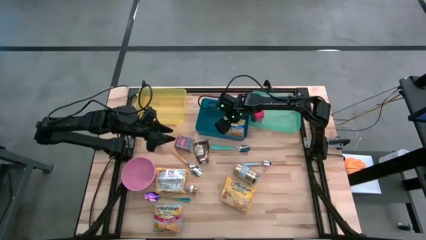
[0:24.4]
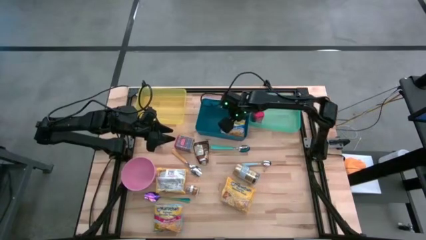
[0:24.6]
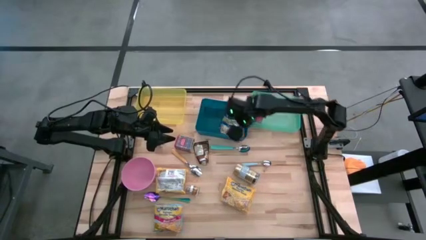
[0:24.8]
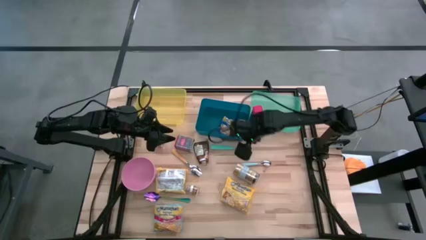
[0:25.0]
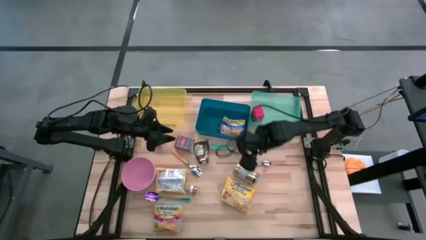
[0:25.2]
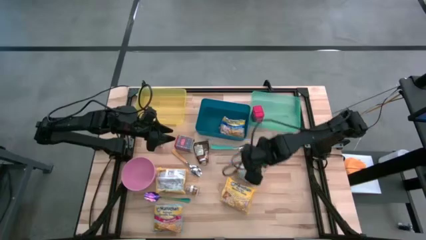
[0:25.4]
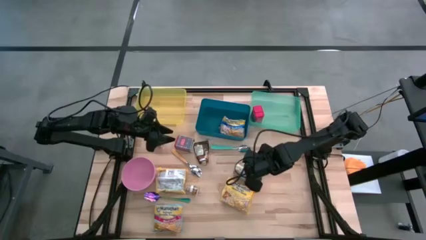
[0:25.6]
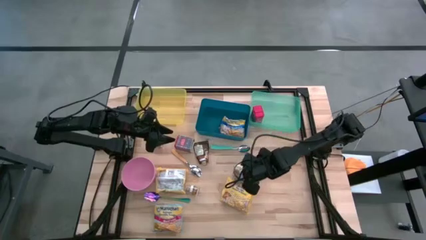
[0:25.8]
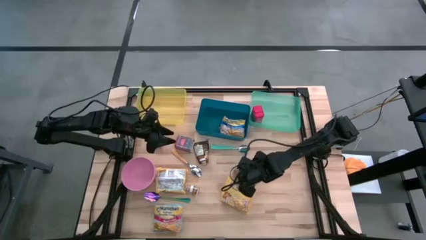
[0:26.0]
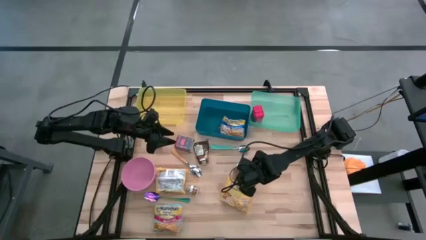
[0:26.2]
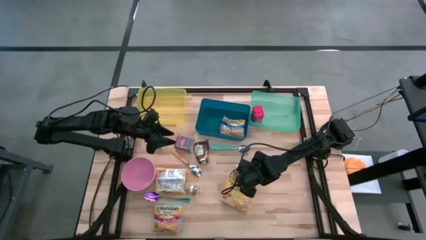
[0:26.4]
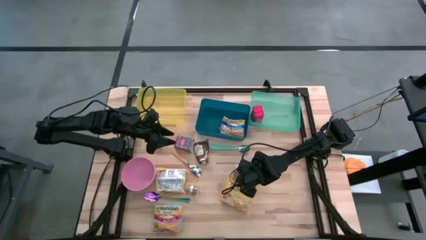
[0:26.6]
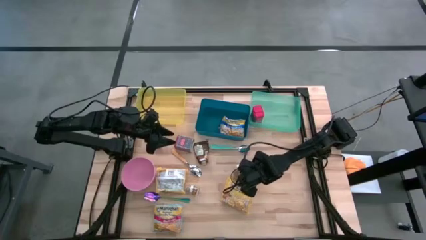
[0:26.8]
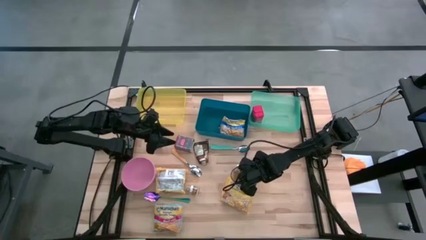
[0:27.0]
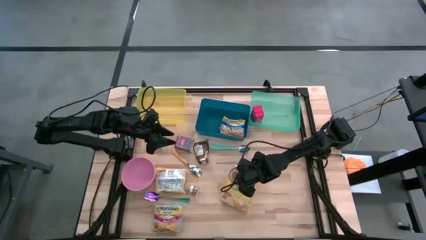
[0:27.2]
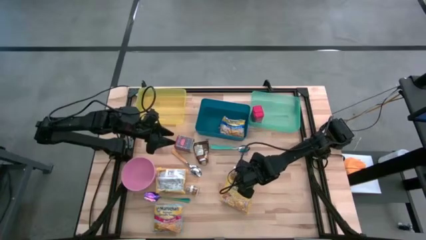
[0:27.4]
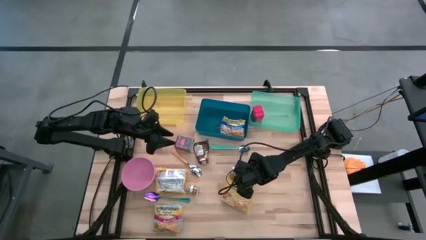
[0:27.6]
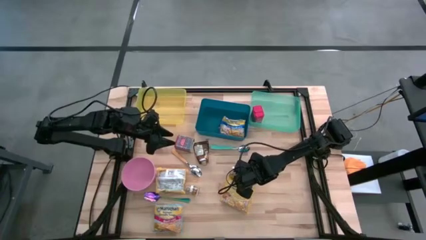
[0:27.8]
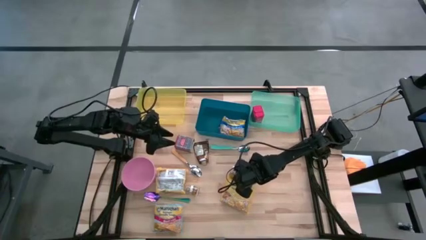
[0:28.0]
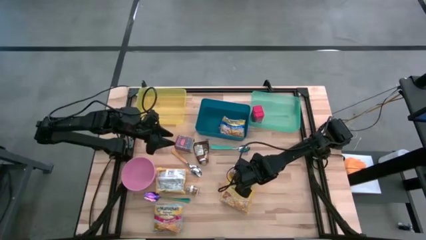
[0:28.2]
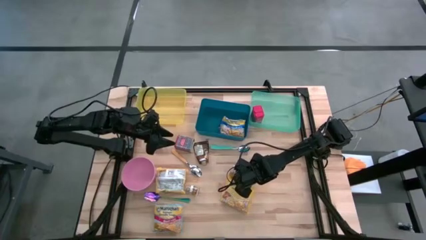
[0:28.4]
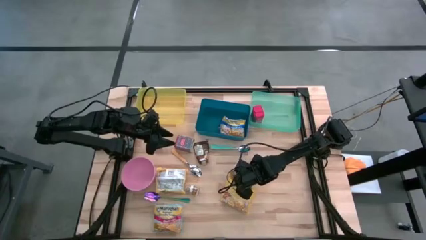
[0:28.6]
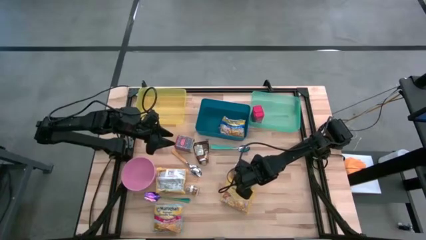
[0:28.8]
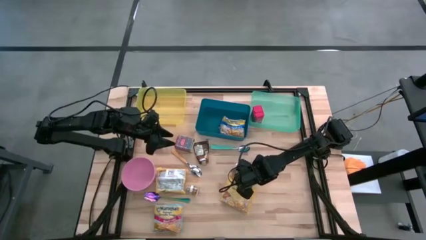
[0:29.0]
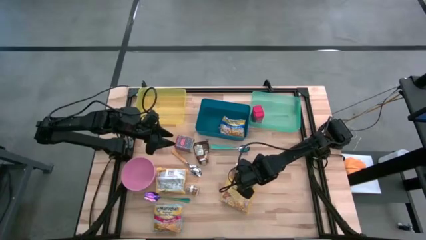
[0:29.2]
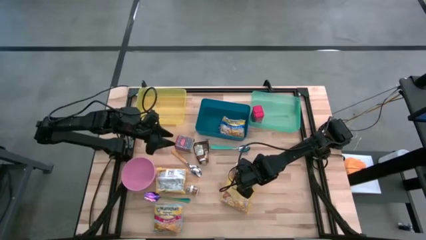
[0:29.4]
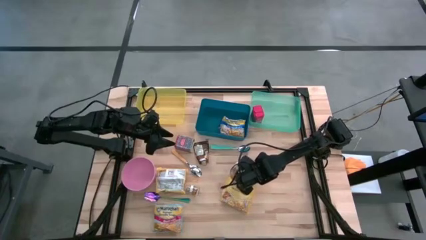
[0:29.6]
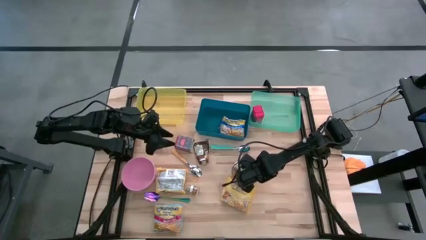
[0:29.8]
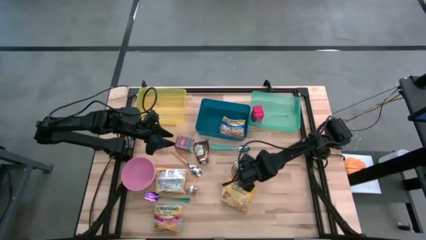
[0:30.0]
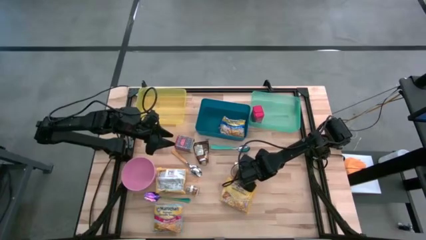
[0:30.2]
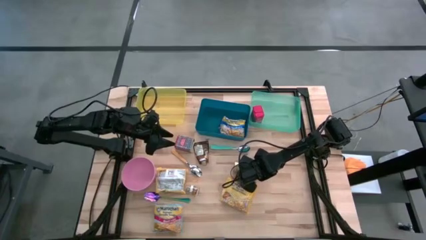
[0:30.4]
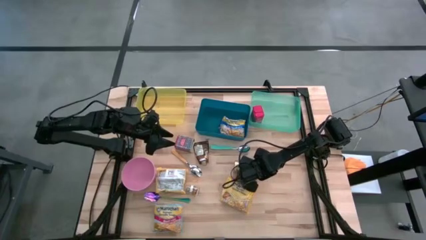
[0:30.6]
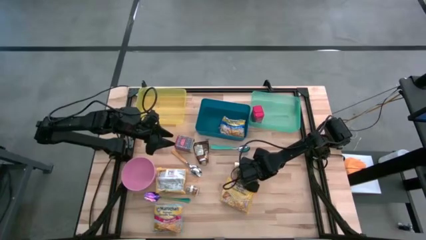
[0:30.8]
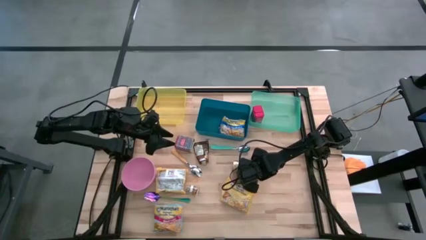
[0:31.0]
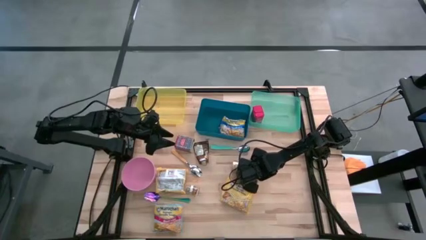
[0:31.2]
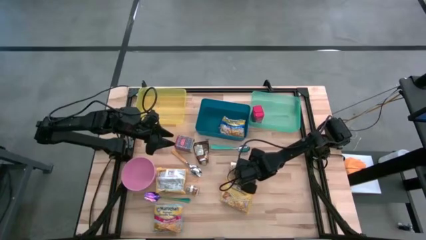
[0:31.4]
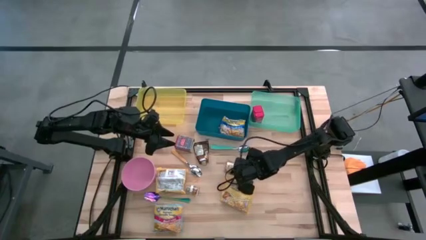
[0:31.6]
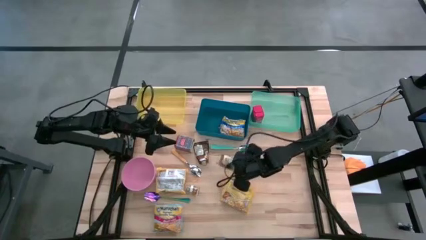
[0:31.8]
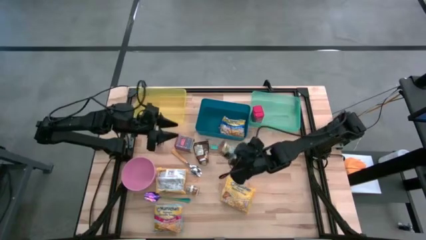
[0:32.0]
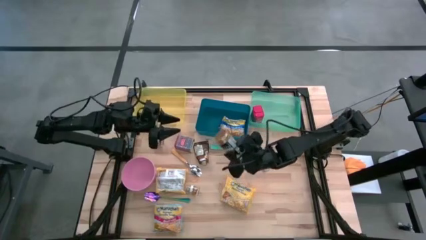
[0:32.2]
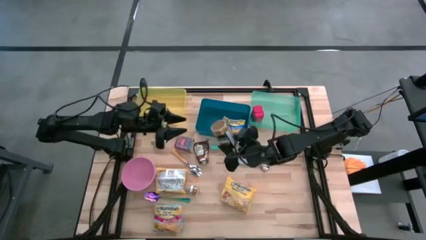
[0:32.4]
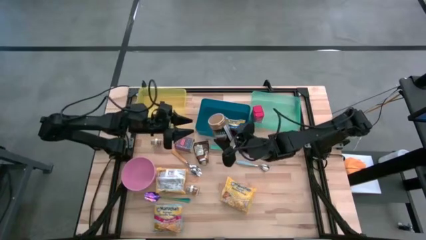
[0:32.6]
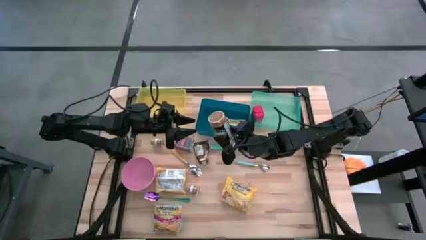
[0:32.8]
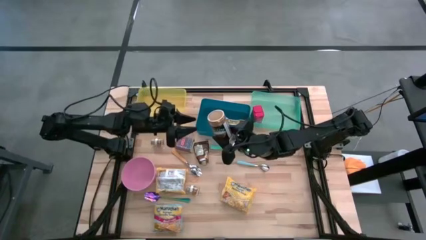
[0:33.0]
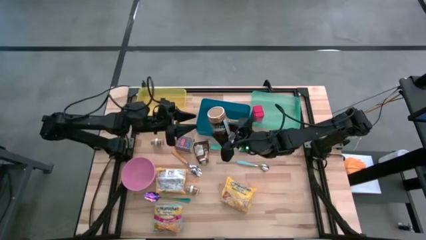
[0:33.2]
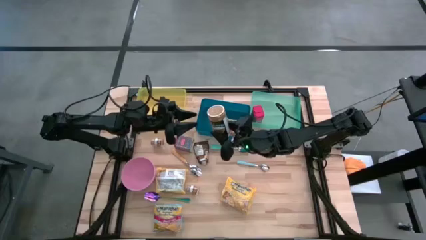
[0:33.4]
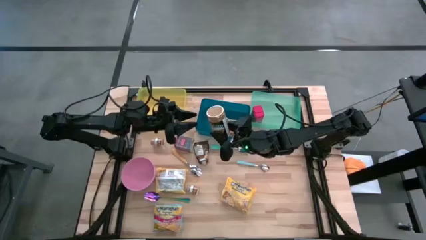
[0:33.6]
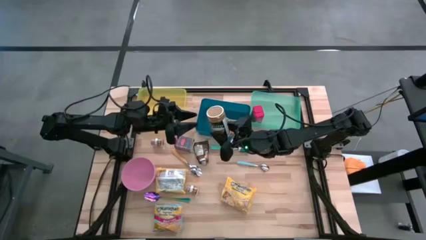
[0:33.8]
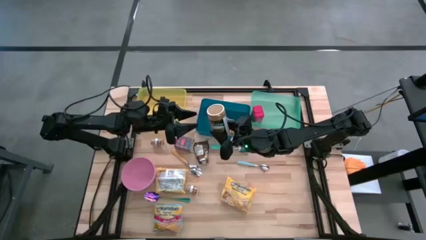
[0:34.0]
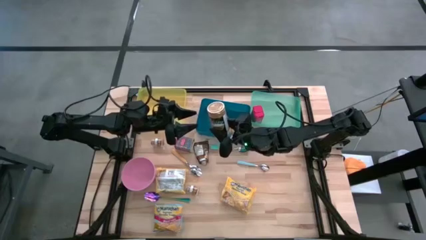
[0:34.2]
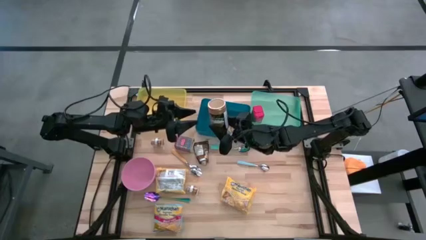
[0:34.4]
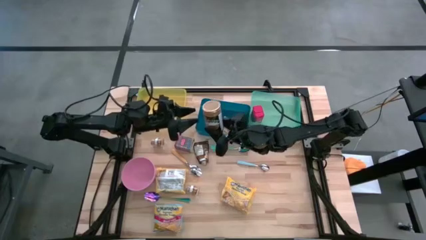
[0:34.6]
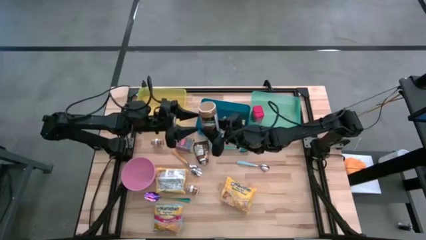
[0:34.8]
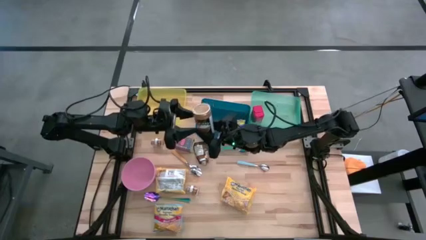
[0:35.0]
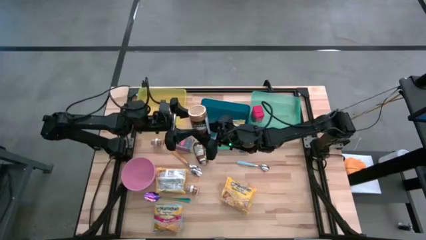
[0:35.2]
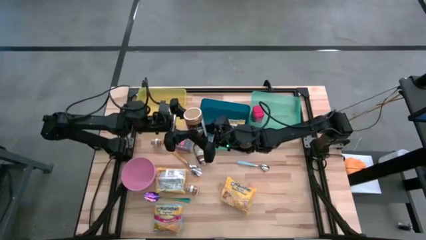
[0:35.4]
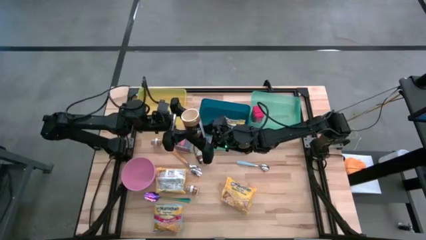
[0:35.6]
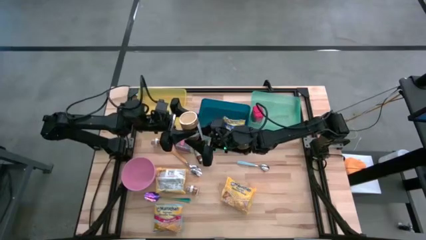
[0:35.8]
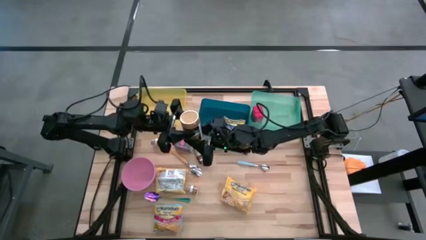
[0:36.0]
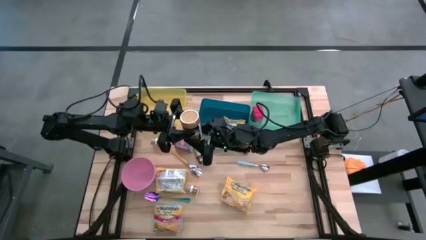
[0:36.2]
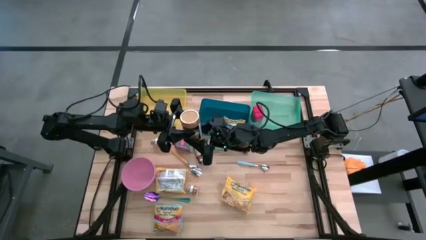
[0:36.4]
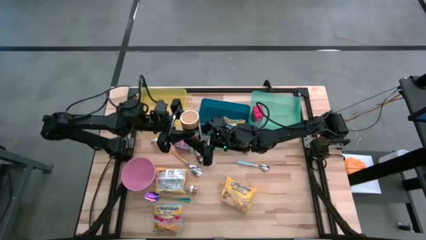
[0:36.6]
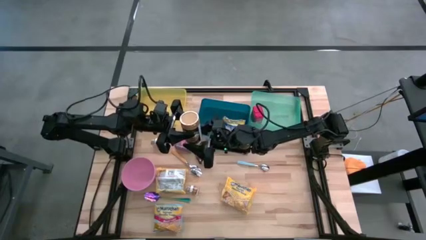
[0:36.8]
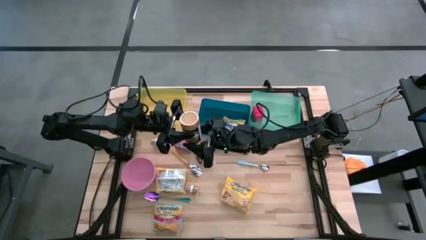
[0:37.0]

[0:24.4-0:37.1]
Put the golden seasoning bottle into the light green bin
